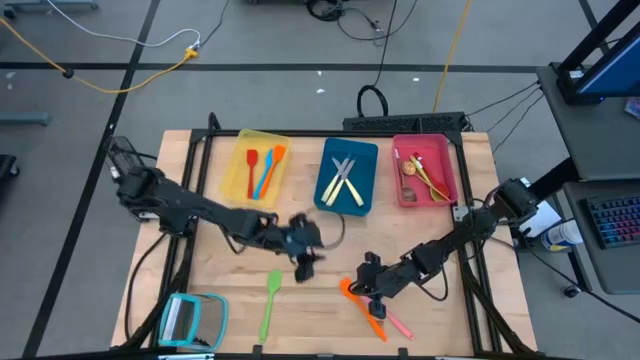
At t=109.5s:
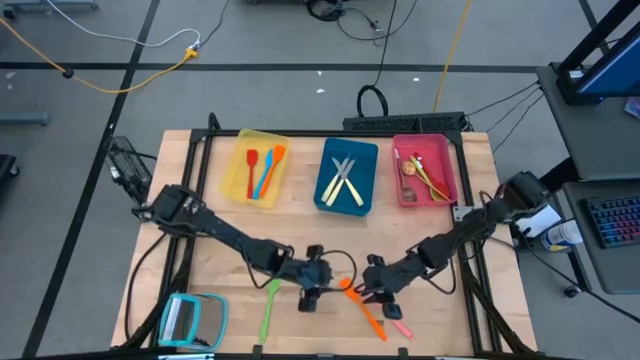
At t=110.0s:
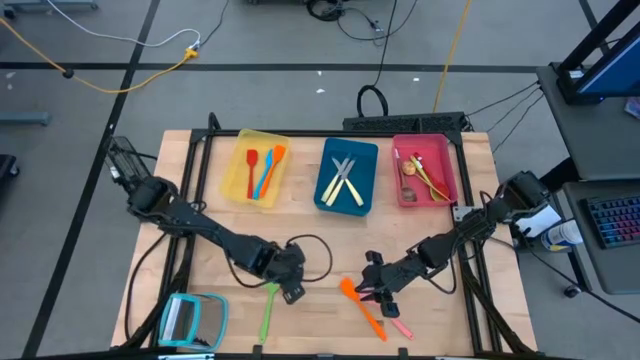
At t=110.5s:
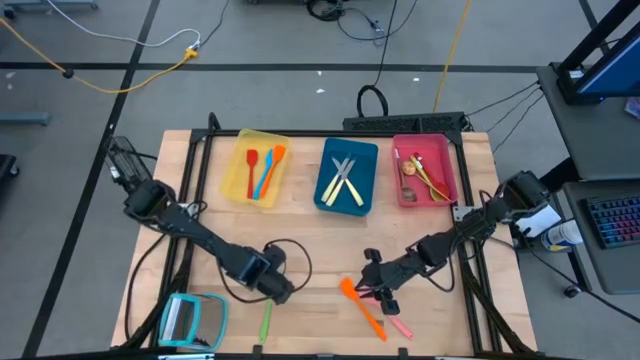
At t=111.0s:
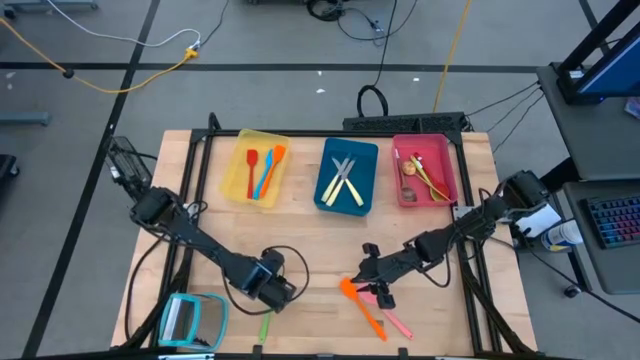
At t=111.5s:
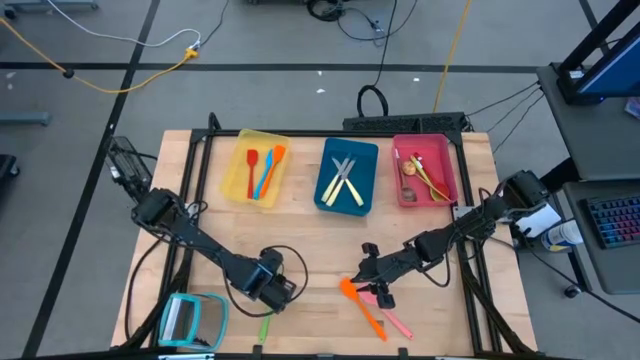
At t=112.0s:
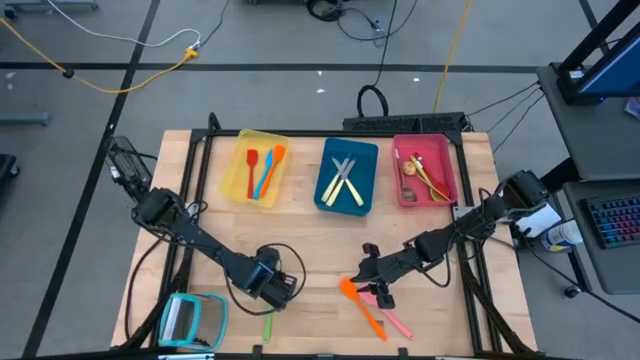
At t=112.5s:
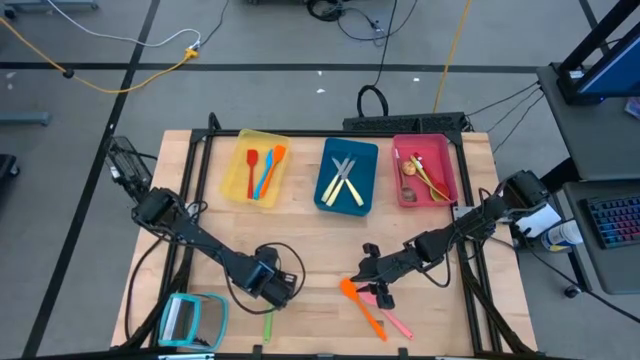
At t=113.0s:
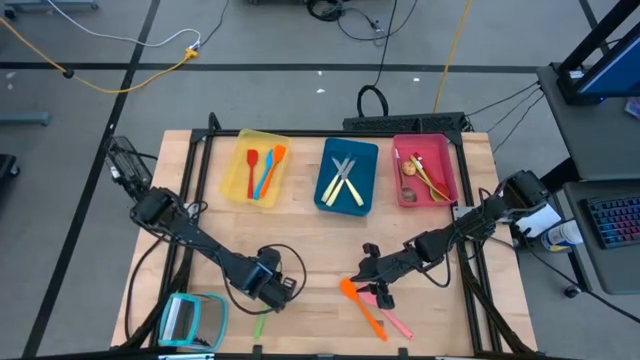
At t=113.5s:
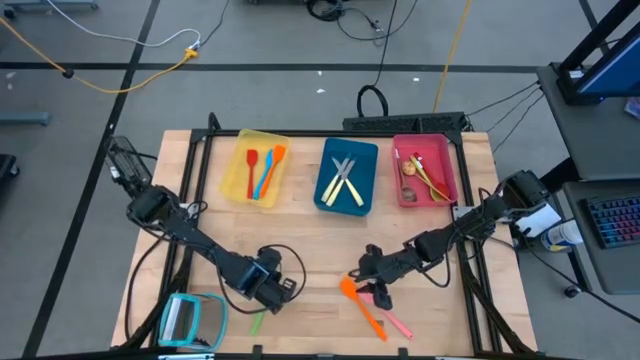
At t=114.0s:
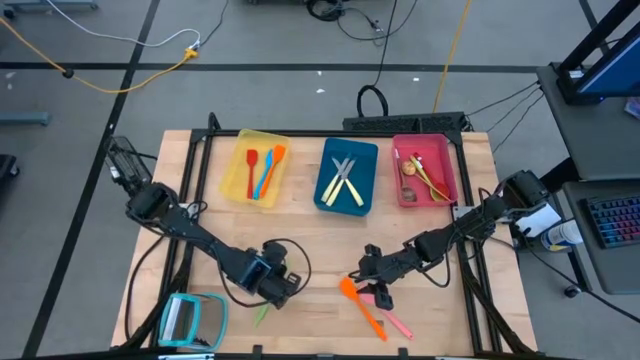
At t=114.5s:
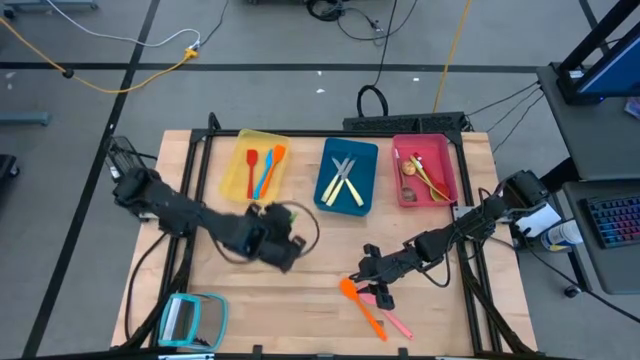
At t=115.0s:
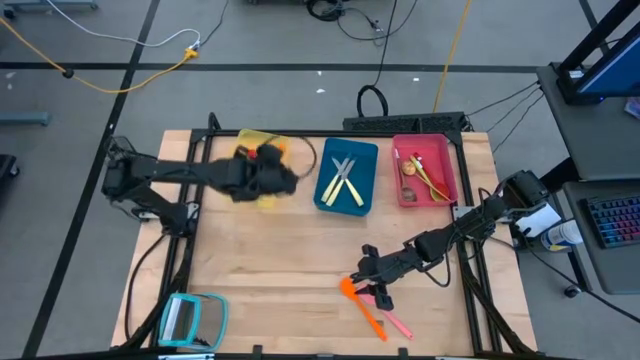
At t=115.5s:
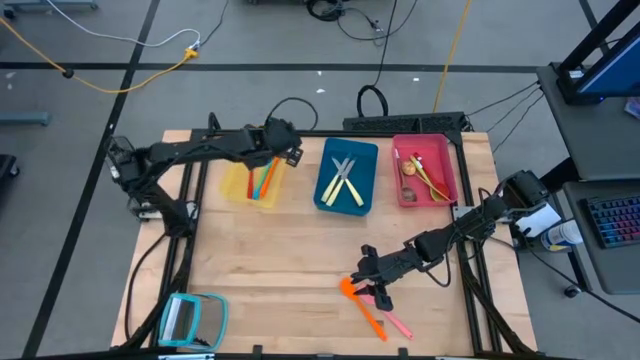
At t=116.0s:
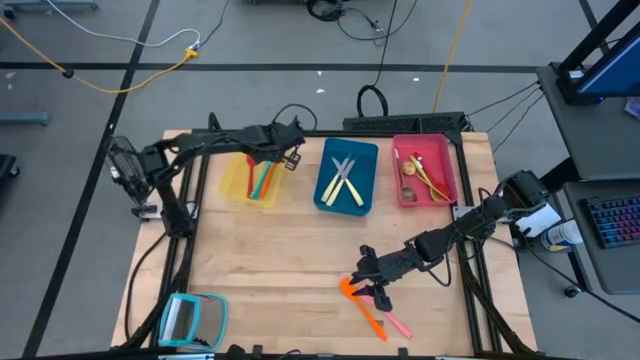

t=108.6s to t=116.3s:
Task: Pick & Place Kitchen Items
Put the green spatula into the yellow bin

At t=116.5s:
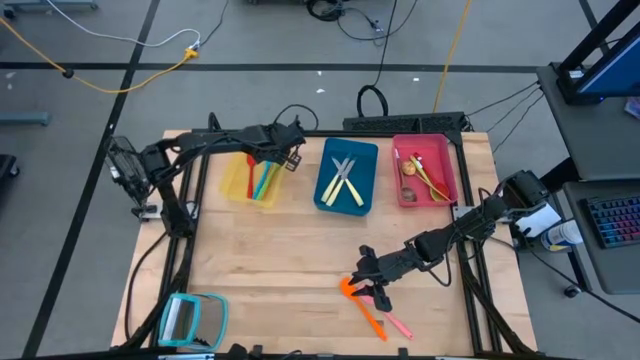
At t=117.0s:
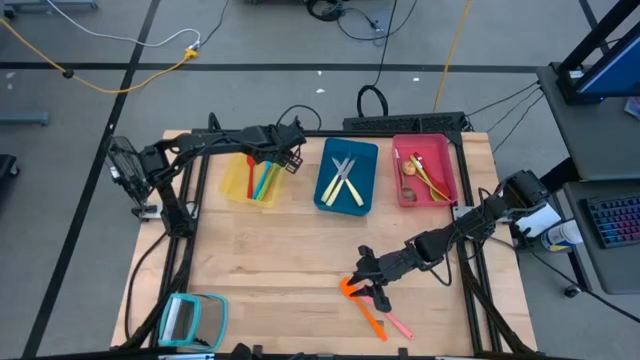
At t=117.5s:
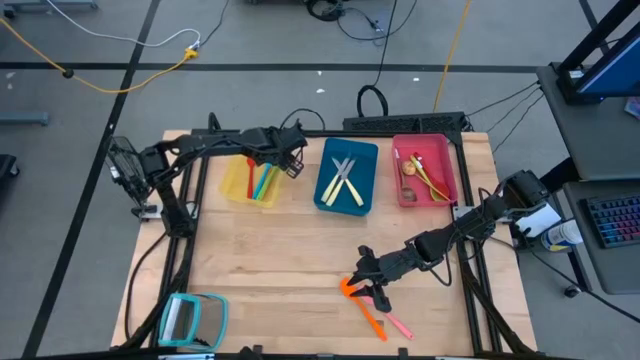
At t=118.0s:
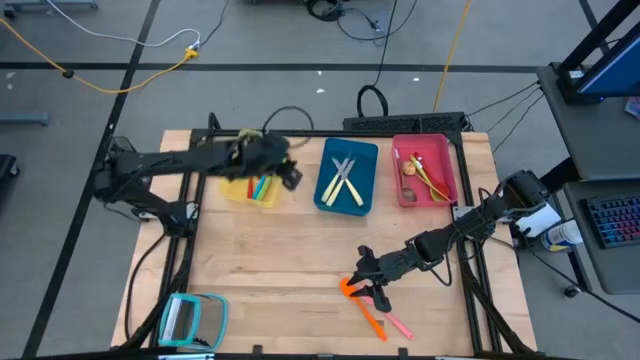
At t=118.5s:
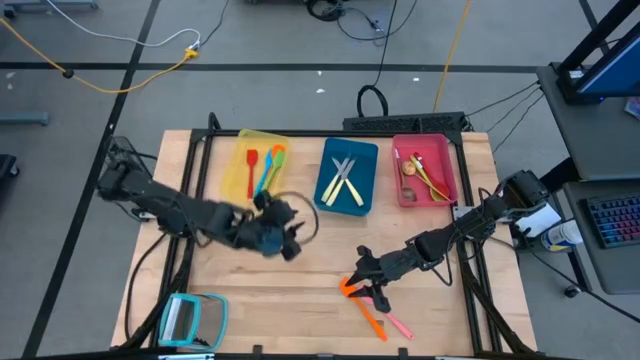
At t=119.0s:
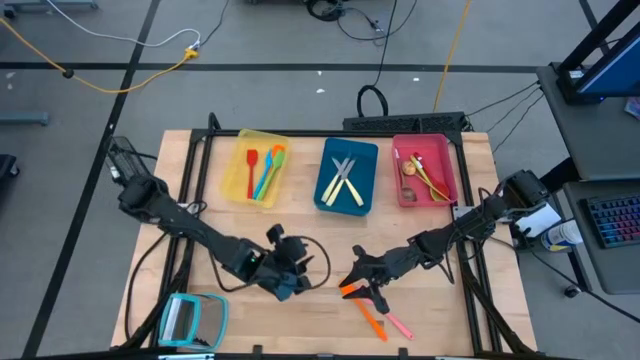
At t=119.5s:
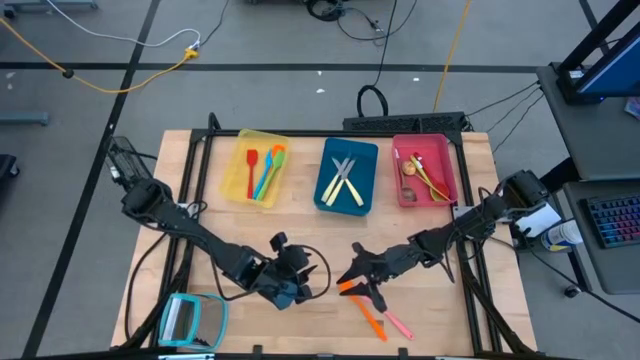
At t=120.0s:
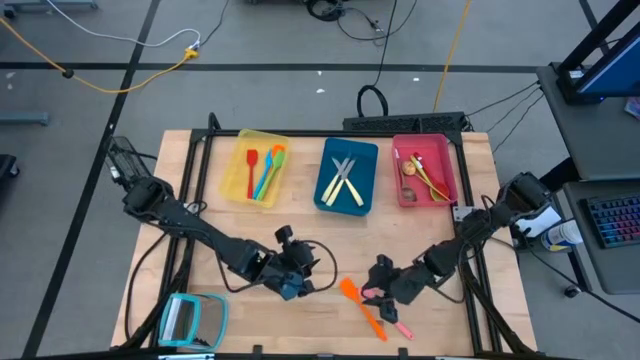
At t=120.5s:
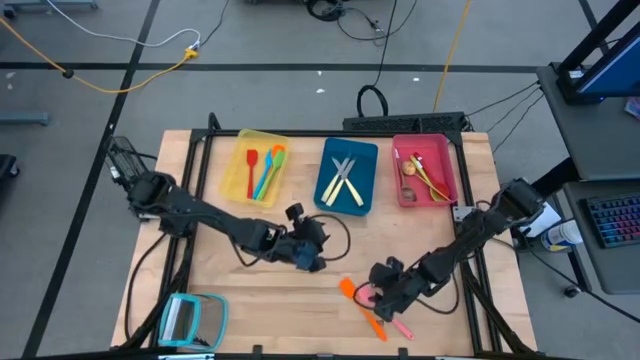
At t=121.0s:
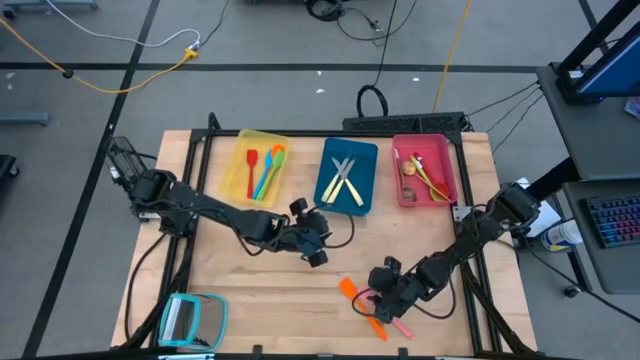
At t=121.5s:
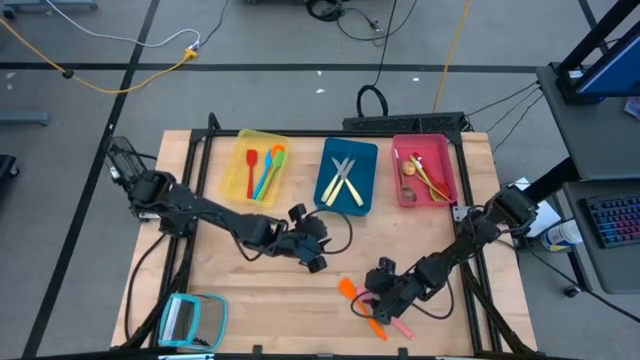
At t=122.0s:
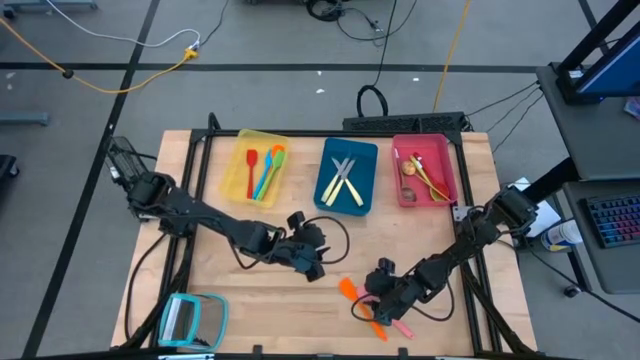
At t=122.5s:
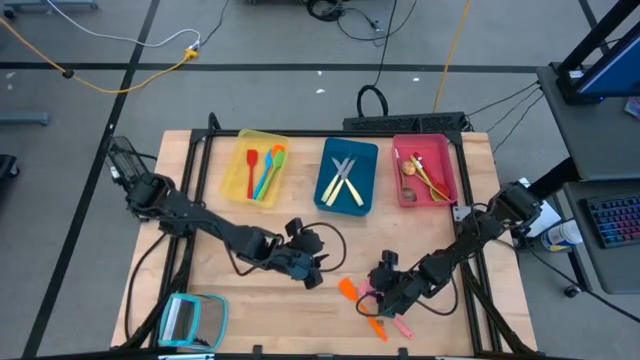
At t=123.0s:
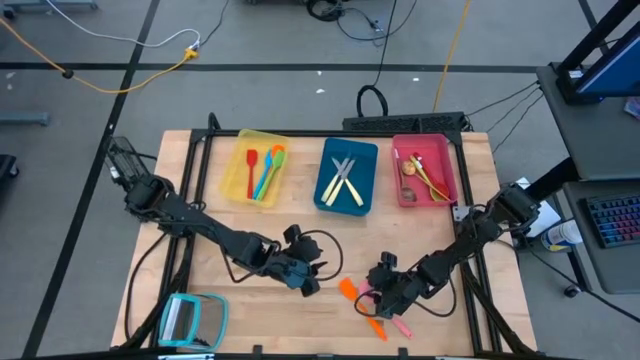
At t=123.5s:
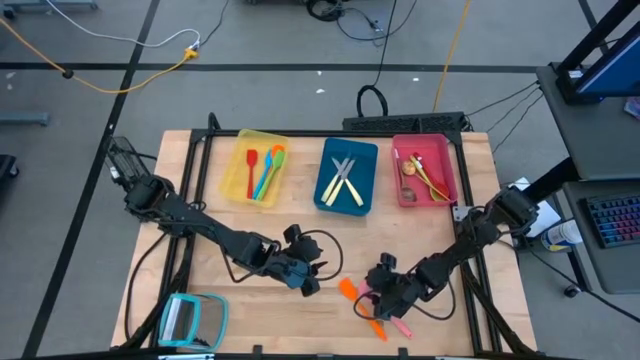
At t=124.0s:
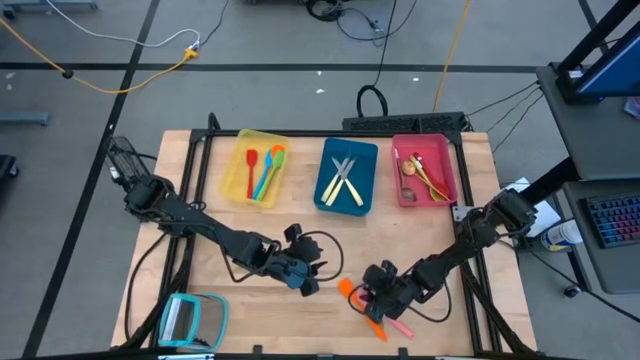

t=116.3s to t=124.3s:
Put the pink spatula into the yellow bin

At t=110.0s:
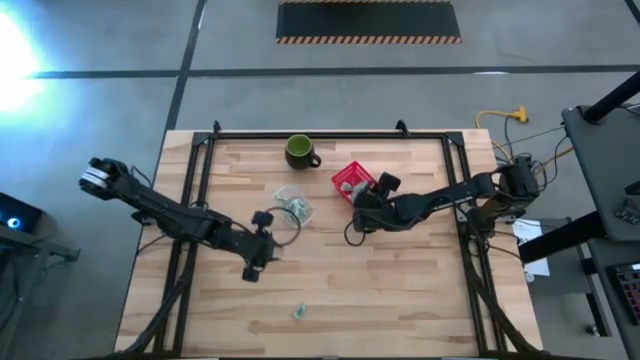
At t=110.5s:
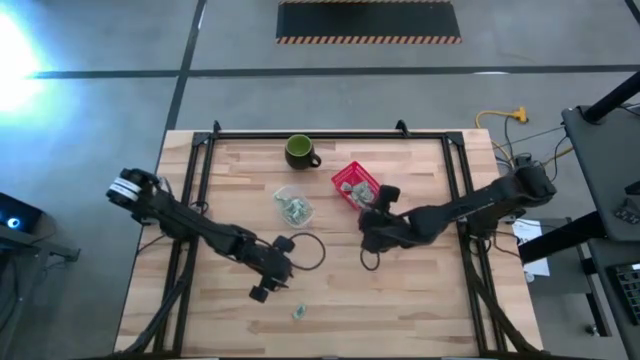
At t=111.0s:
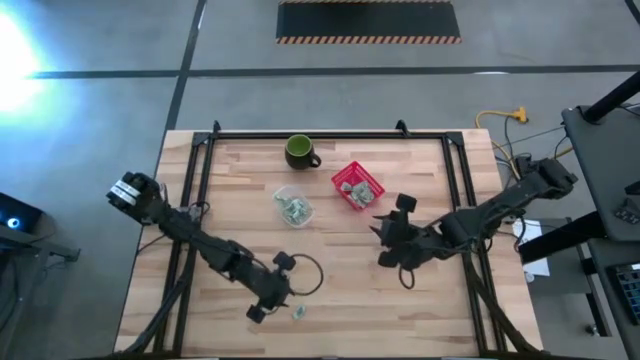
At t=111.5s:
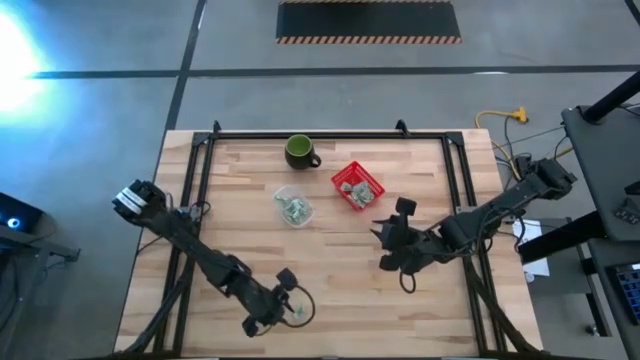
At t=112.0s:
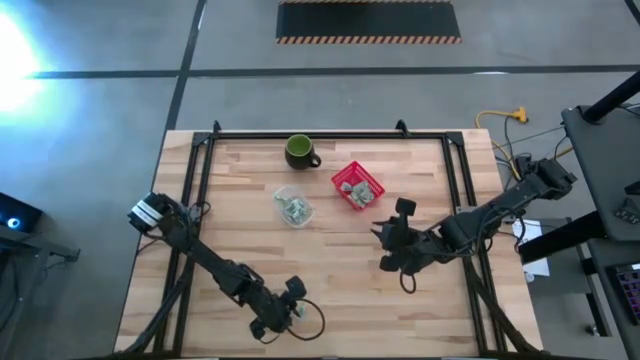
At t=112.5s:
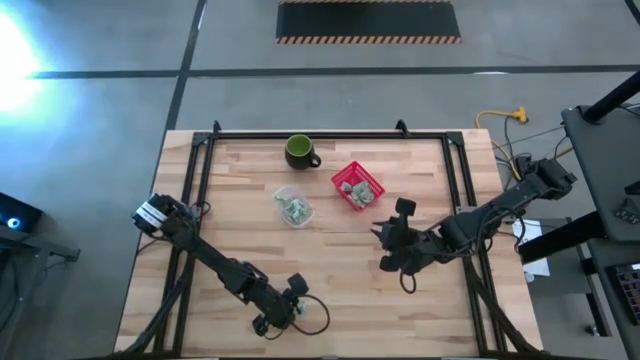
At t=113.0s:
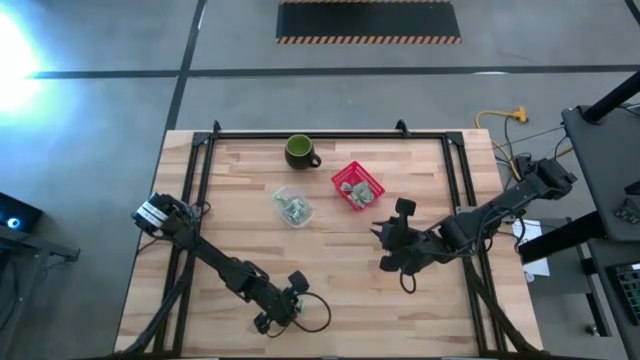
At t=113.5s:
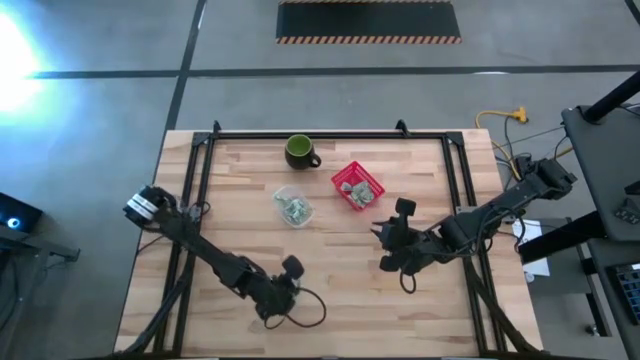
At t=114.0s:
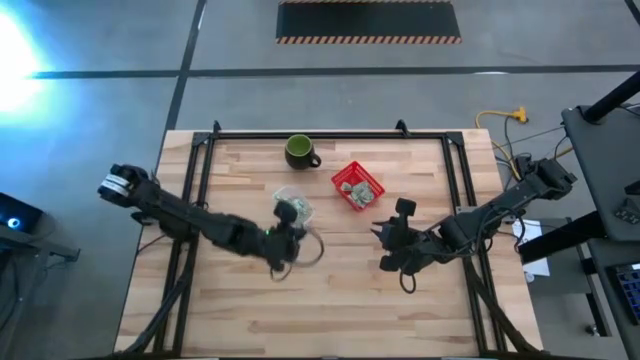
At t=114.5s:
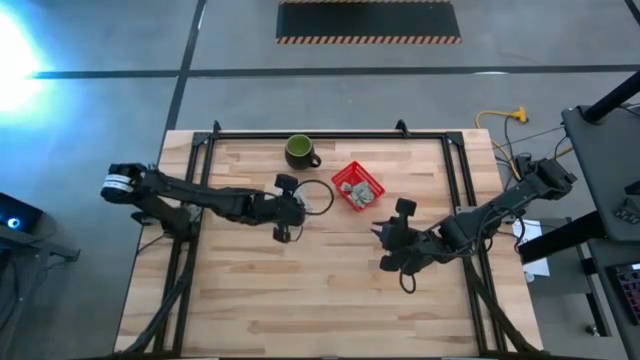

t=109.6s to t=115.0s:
Task: Pick and place items into bin
Put the stevia packet into the transparent bin
